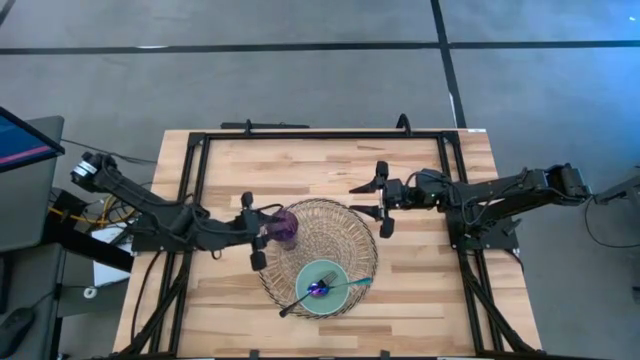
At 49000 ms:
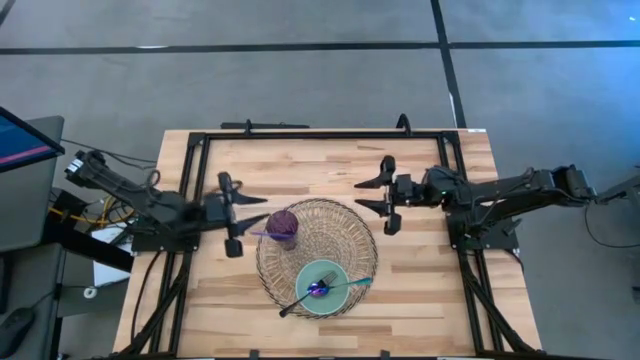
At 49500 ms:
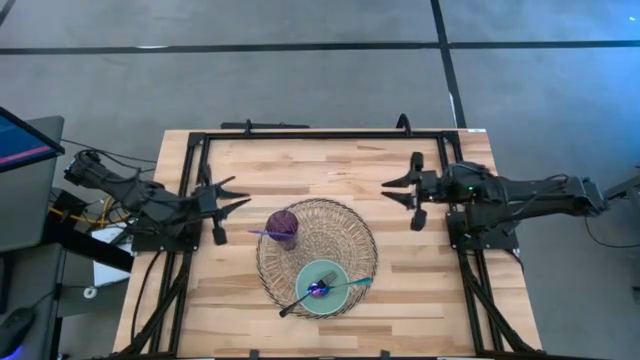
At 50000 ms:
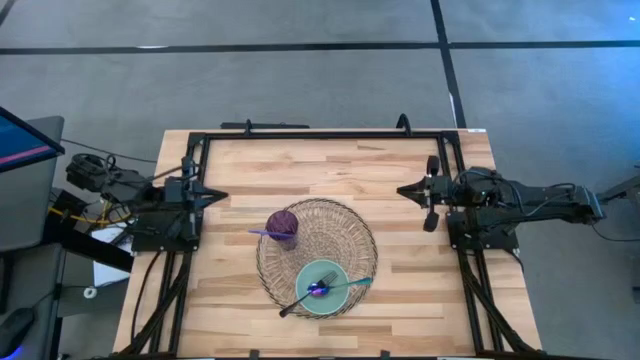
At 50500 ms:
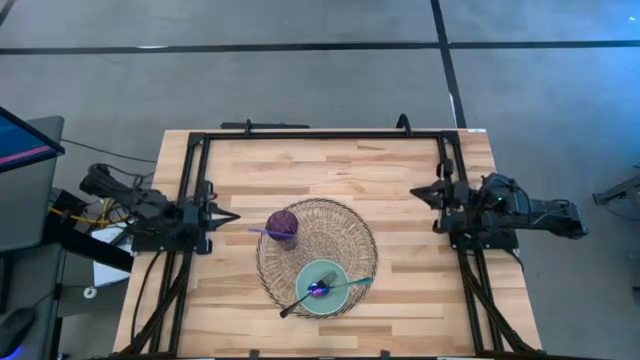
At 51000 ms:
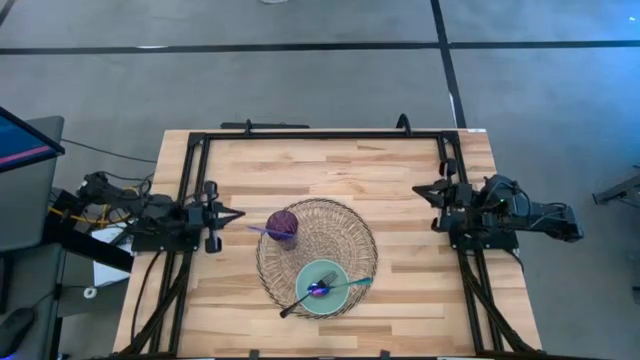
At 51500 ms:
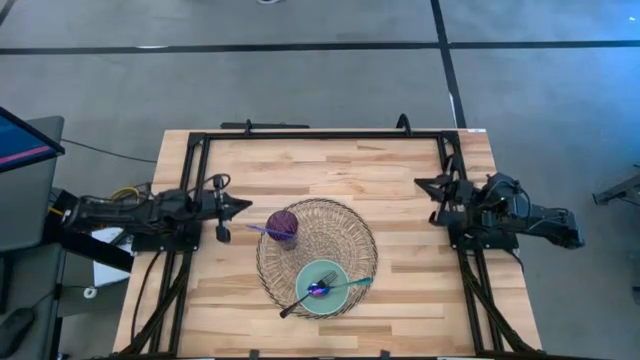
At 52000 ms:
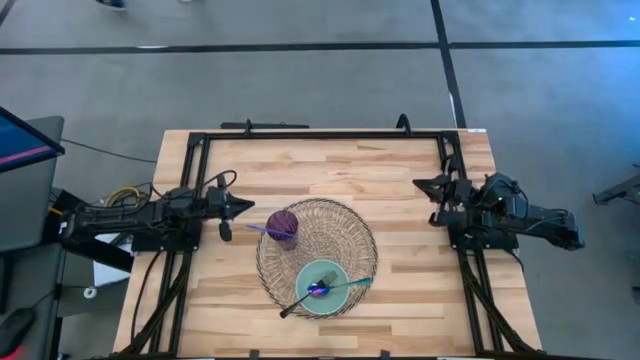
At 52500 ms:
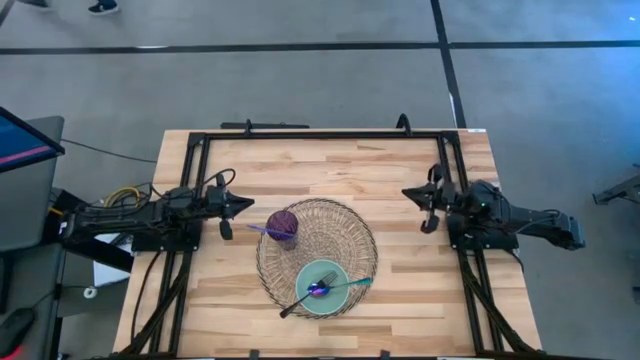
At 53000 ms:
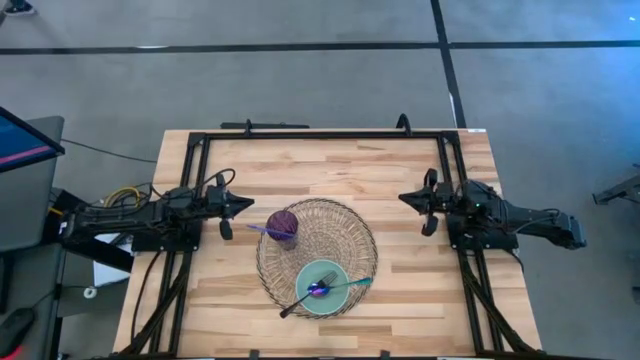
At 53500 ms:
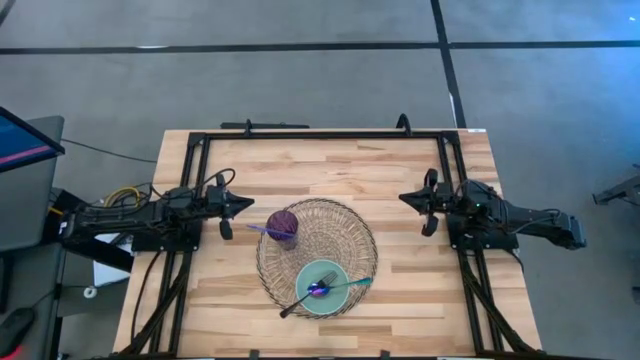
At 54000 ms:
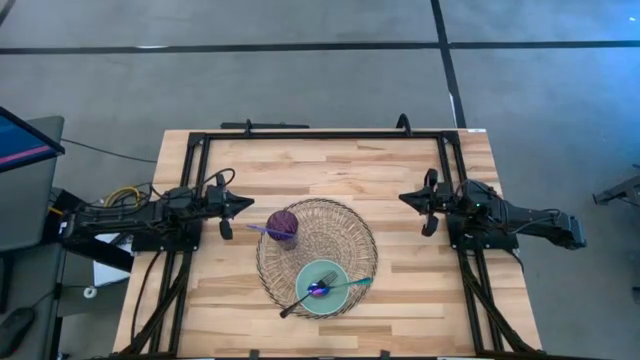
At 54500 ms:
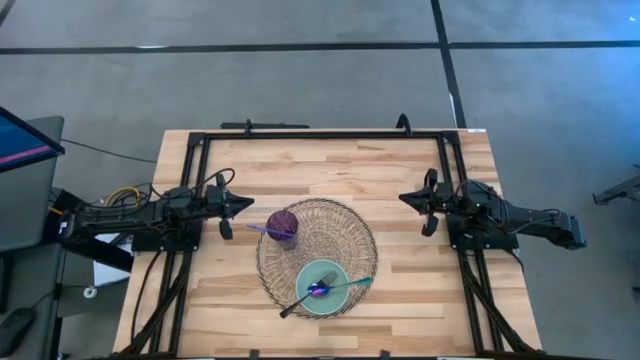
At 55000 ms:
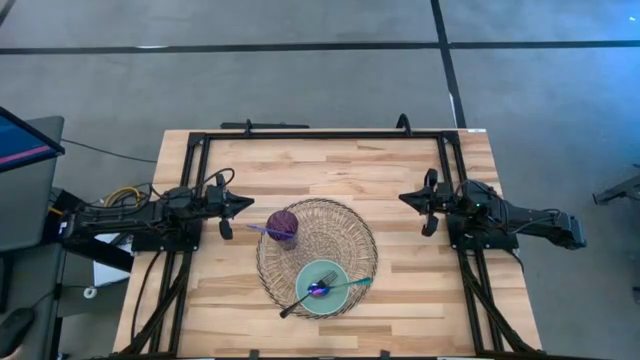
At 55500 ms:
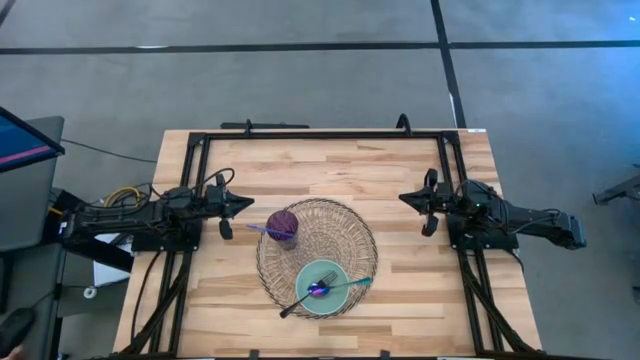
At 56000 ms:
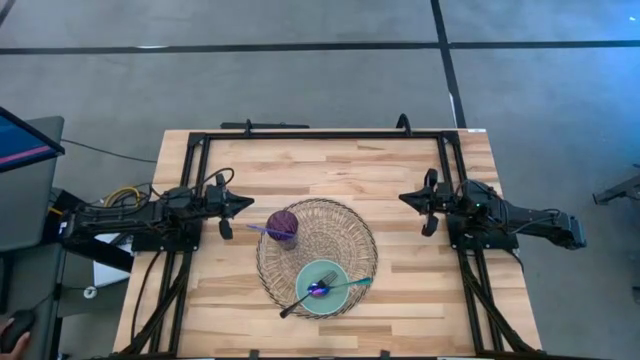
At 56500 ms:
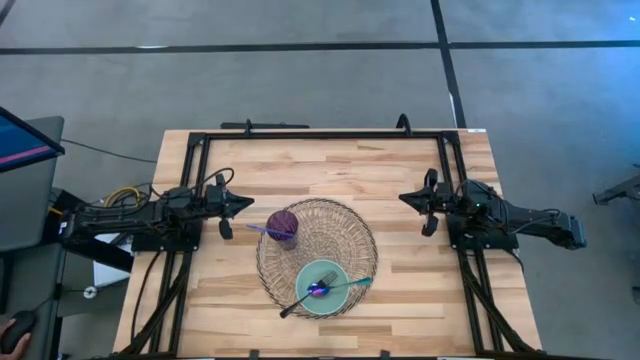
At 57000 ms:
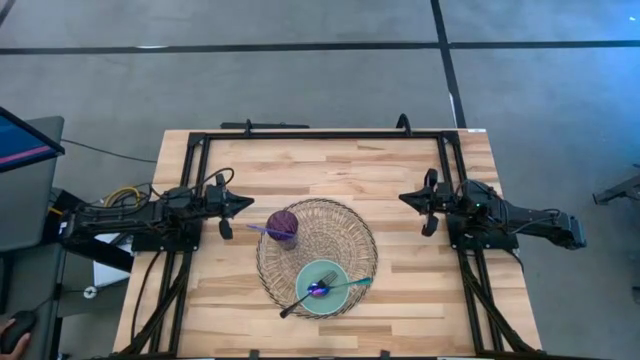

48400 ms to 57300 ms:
Task: Pick & Place Utensil
Return to Home Position

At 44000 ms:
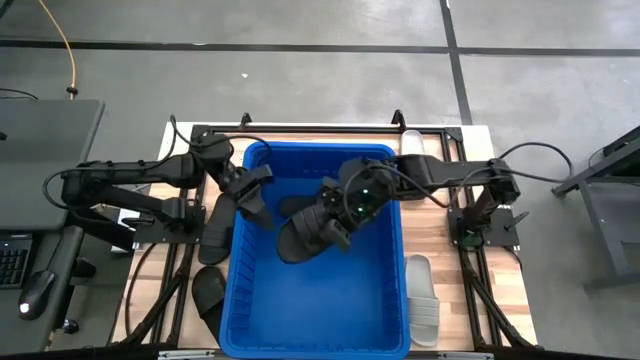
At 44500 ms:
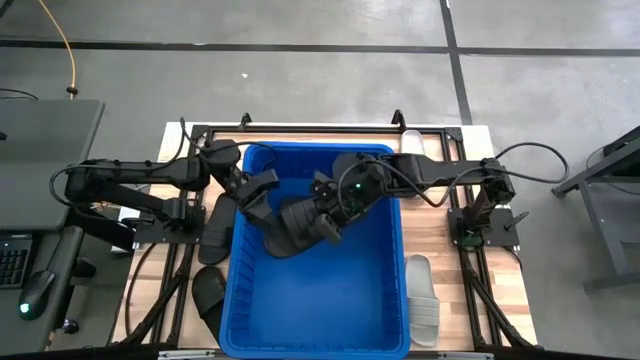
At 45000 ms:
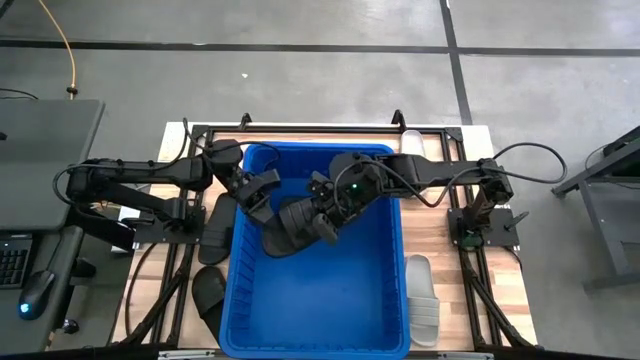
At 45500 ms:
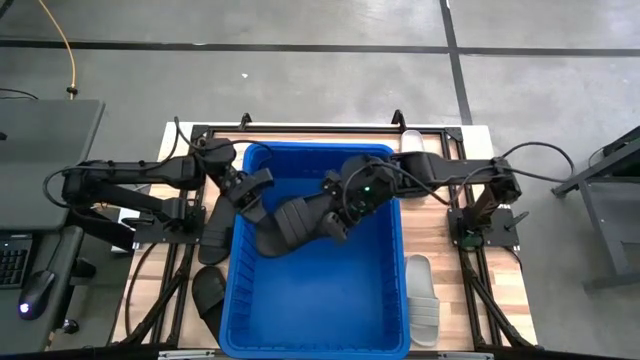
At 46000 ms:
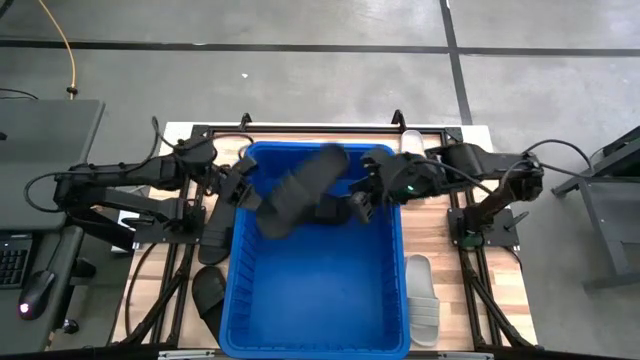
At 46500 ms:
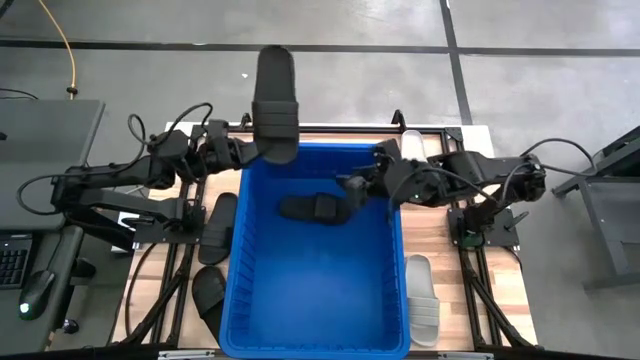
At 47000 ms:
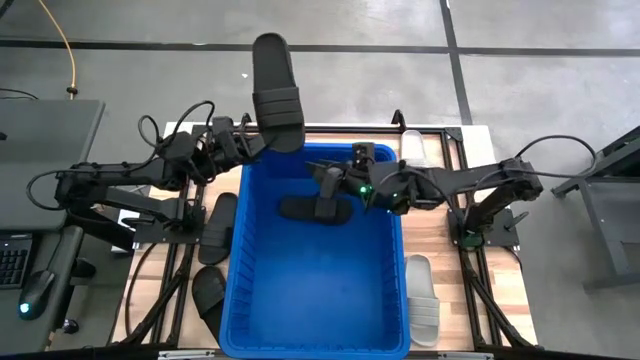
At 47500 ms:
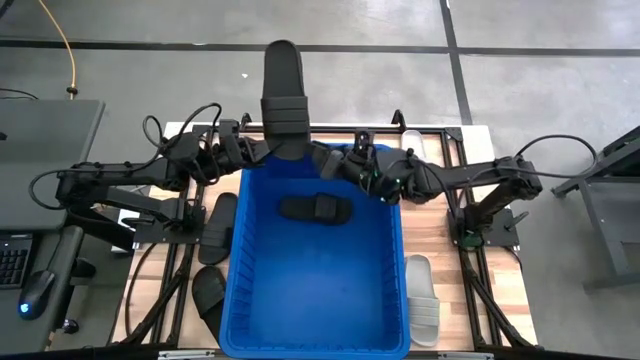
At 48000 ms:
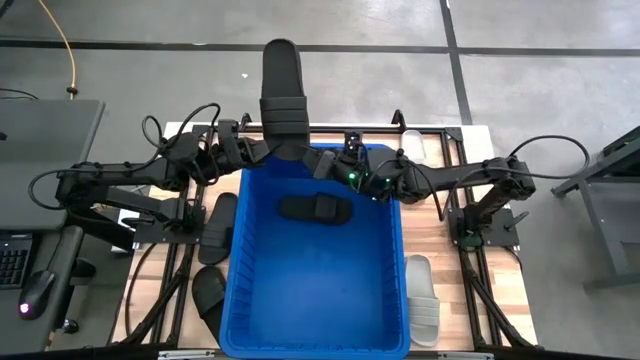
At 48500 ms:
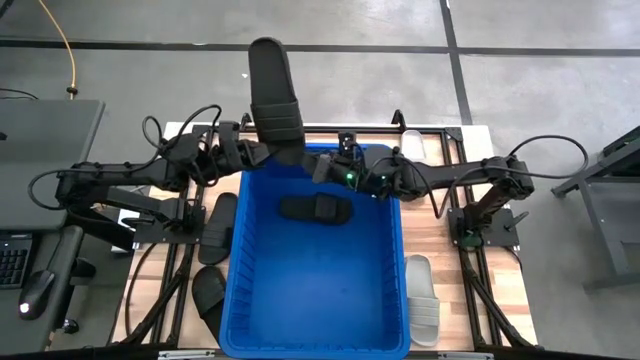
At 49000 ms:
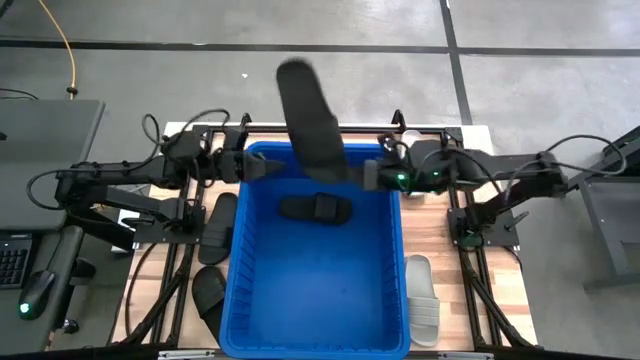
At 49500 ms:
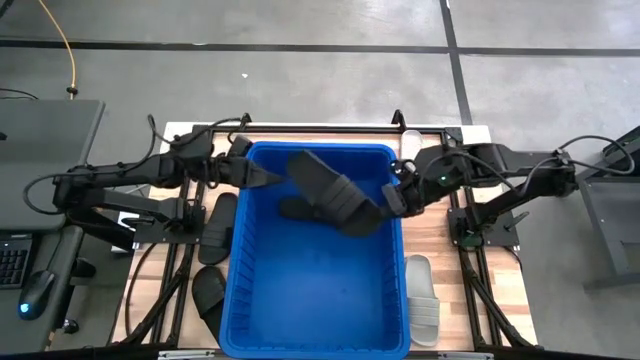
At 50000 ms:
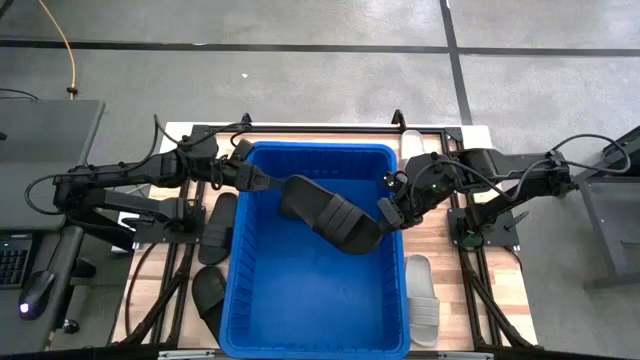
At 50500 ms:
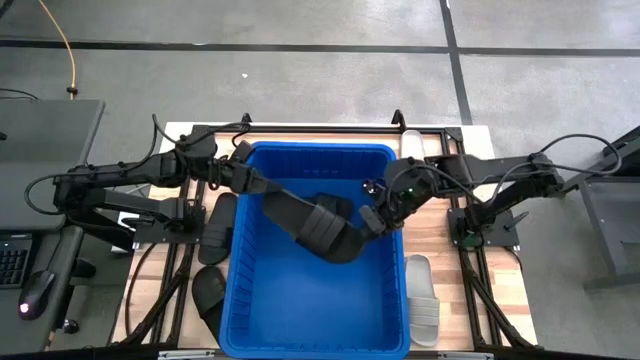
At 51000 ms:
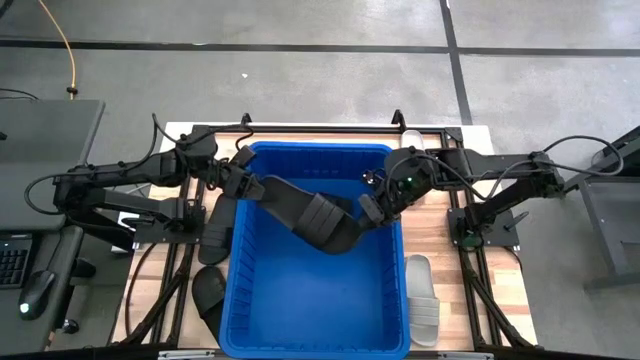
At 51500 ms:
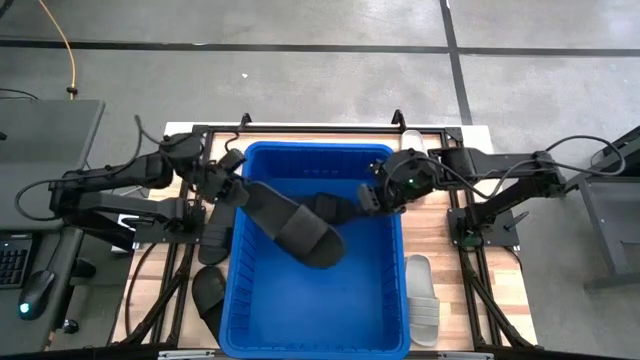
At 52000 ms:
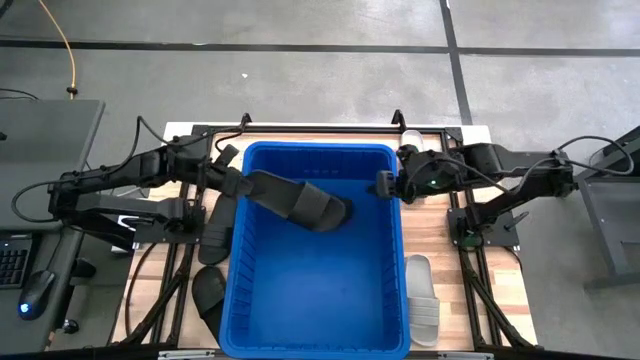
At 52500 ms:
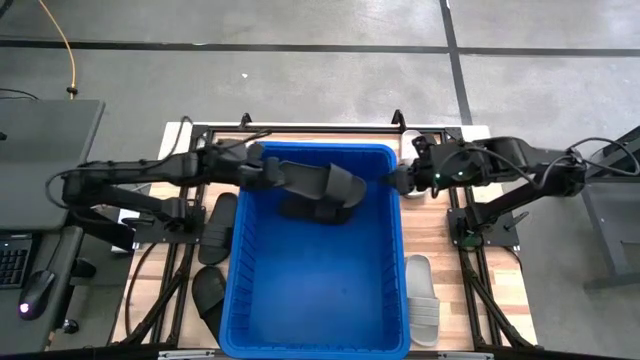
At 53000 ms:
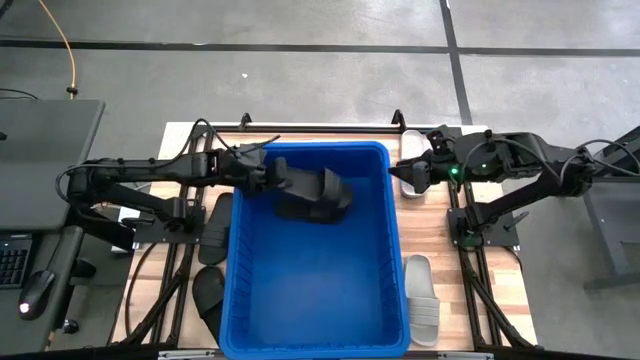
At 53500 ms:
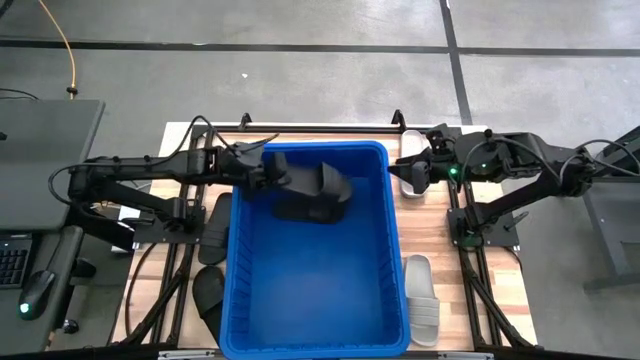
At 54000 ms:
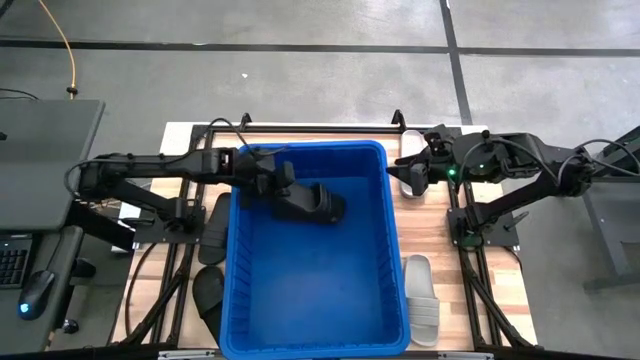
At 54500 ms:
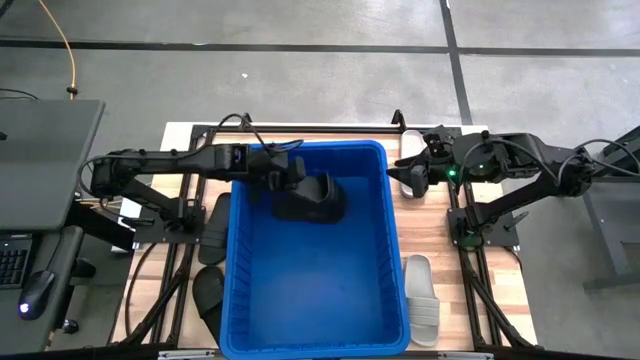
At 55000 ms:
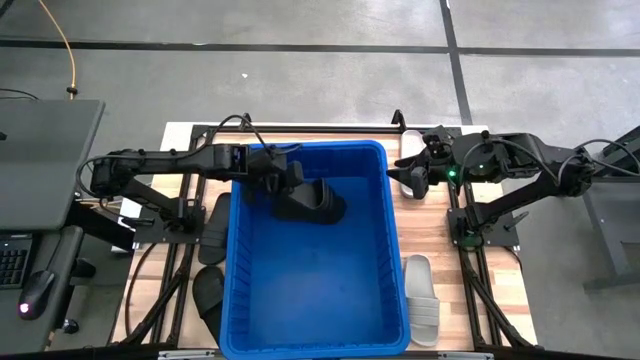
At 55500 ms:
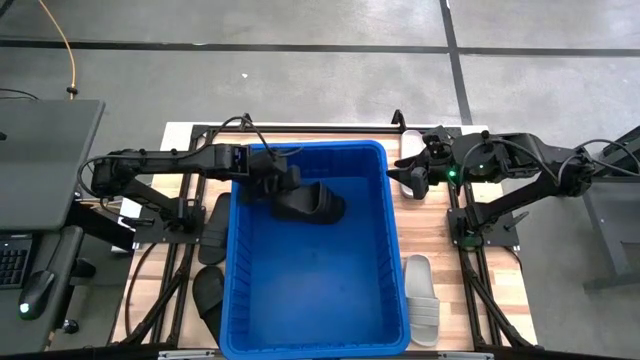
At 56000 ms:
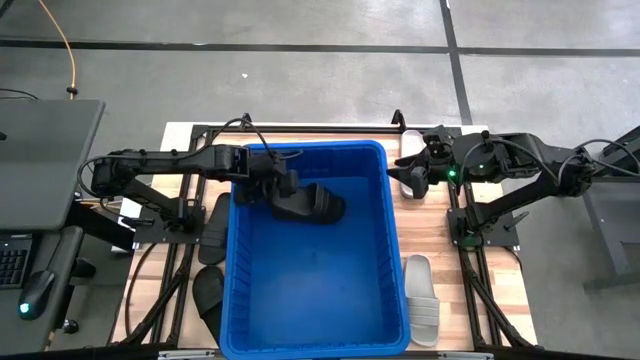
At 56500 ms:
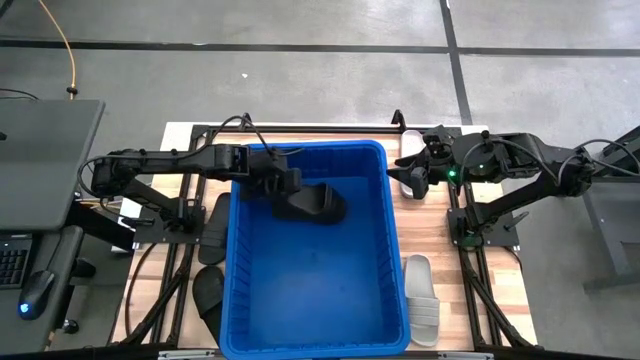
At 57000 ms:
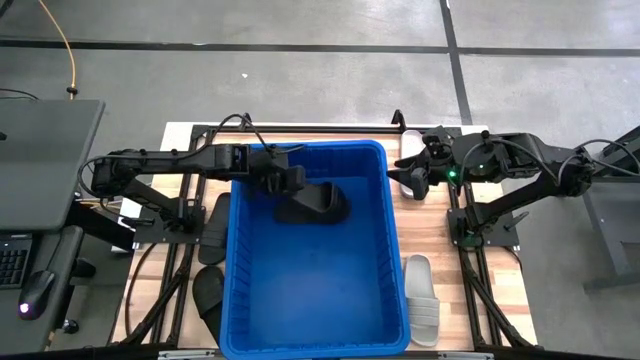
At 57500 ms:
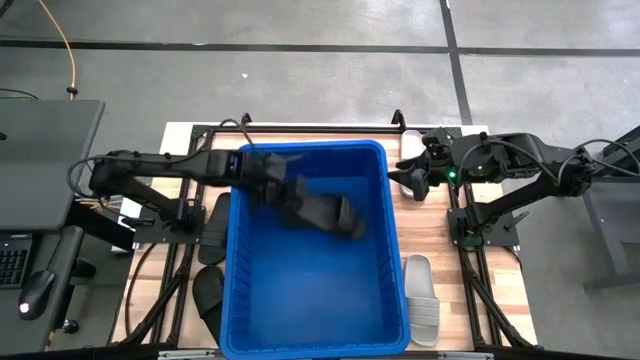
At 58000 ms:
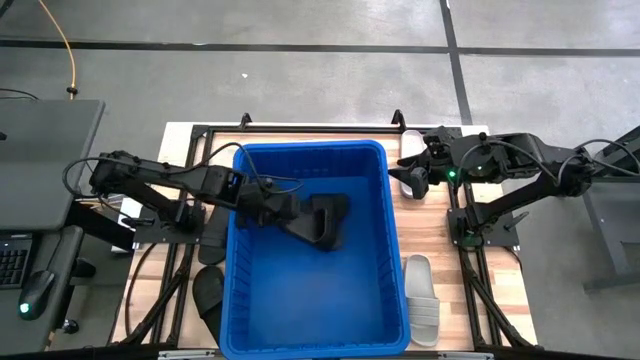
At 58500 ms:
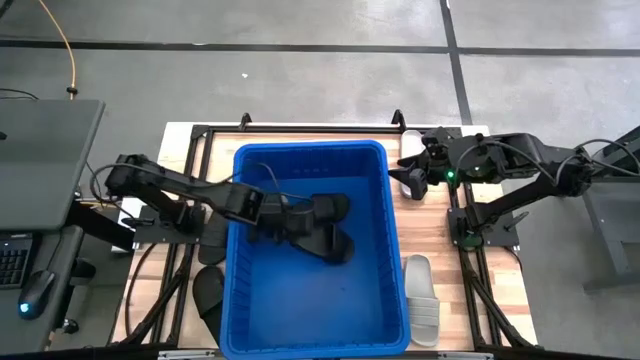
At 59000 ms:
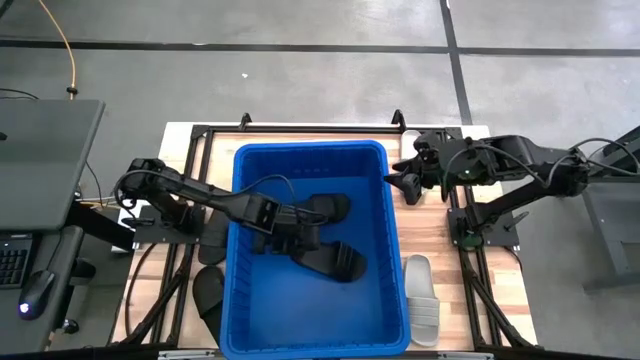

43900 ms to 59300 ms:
Task: Pick and place slides into bin
Put the right black slide in the bin
